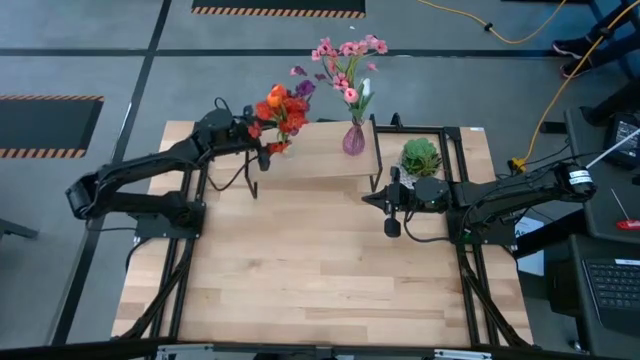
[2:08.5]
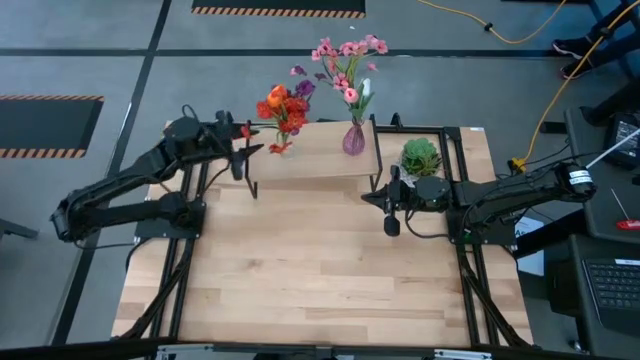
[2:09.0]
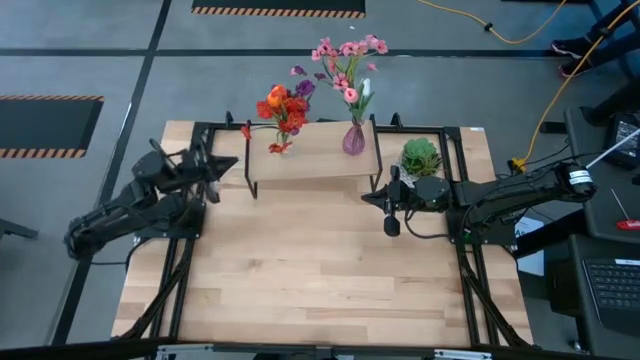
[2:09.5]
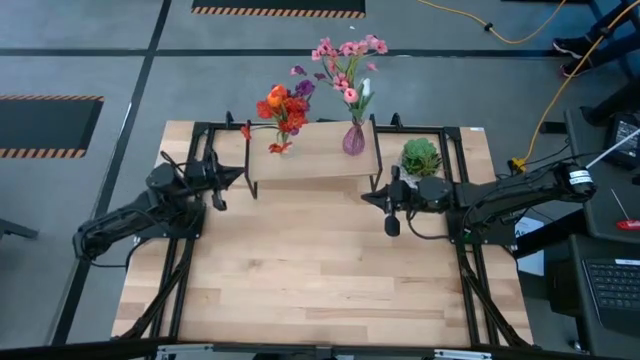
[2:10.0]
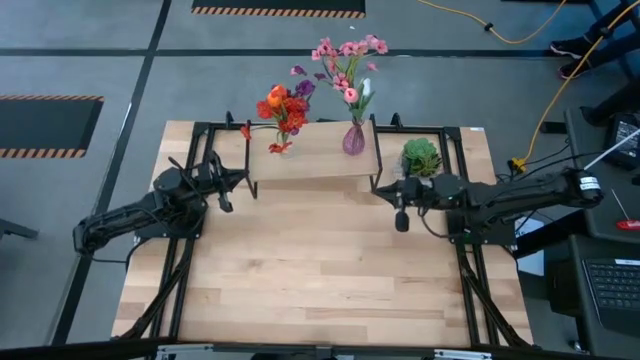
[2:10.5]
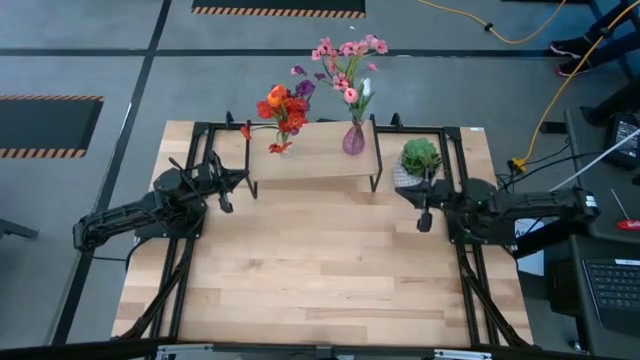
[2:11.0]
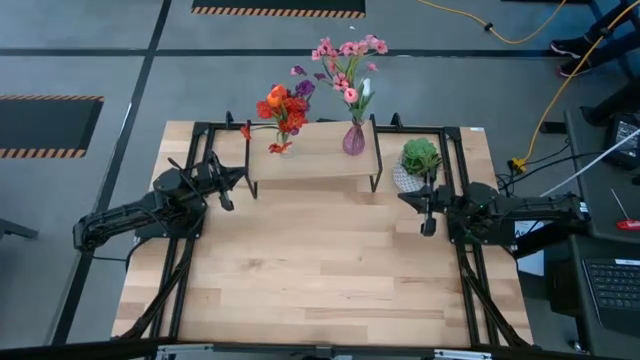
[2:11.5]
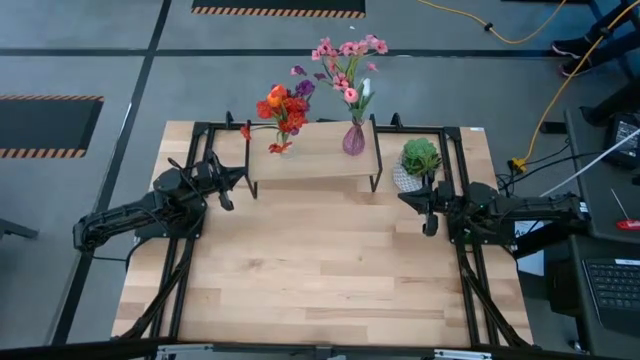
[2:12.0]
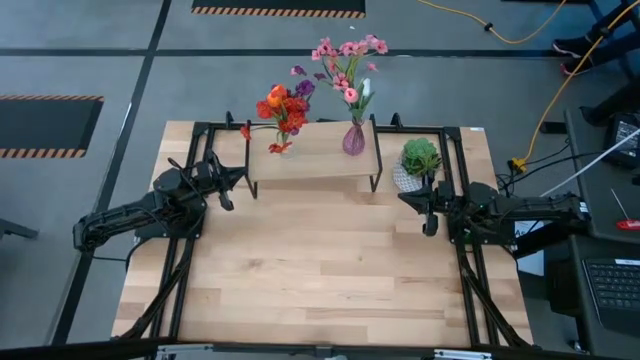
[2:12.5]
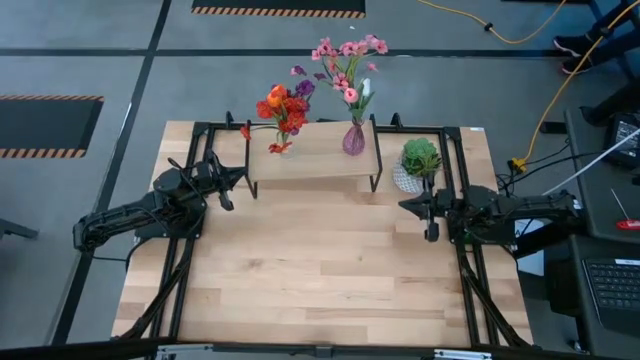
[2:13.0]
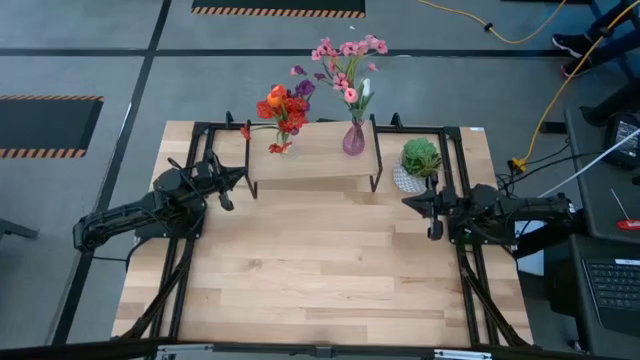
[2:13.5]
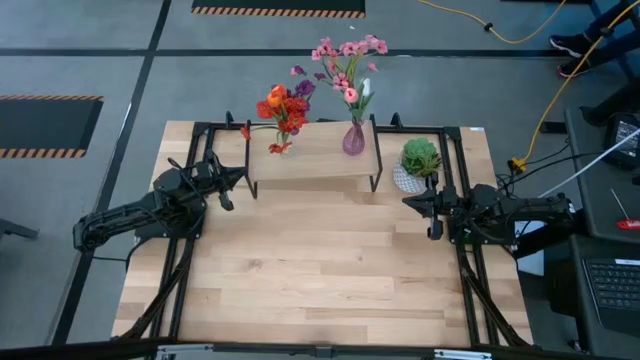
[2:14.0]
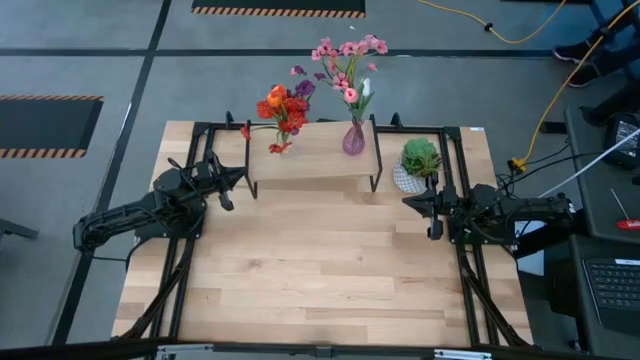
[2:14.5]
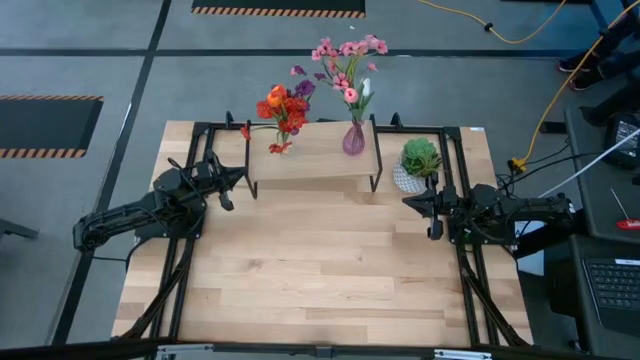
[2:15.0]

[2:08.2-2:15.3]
Task: Pick and place flowers into a vace then onto a shelf
Return to Home Position

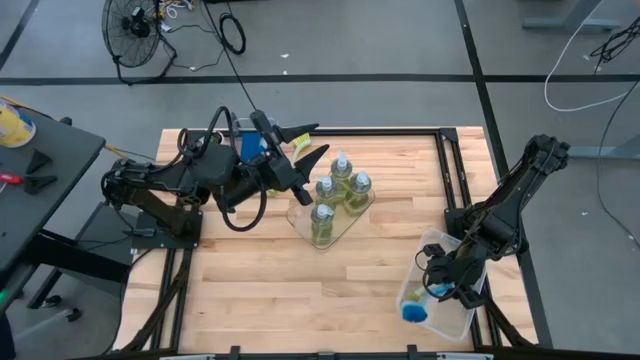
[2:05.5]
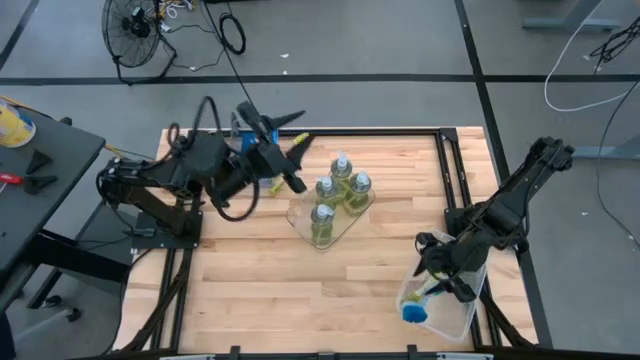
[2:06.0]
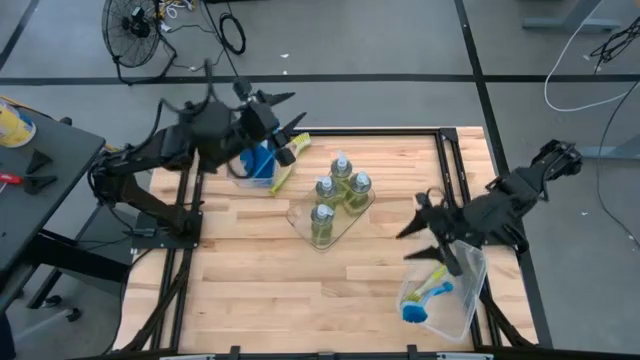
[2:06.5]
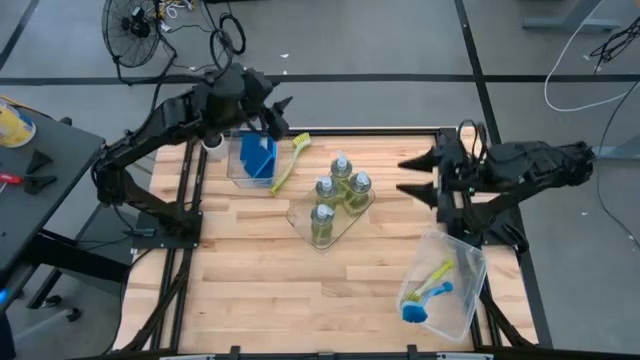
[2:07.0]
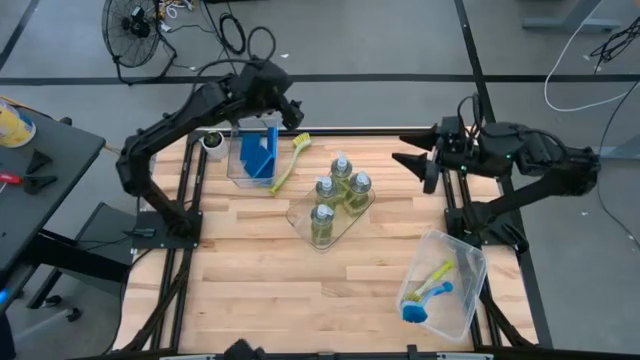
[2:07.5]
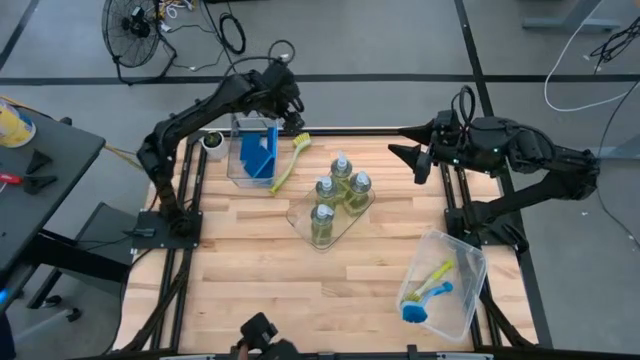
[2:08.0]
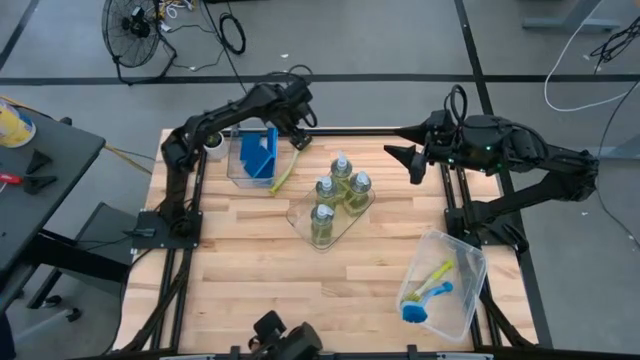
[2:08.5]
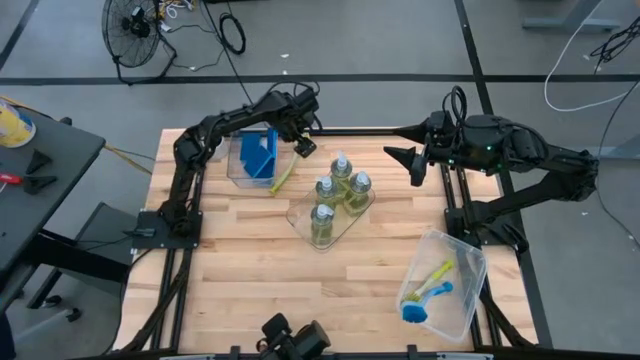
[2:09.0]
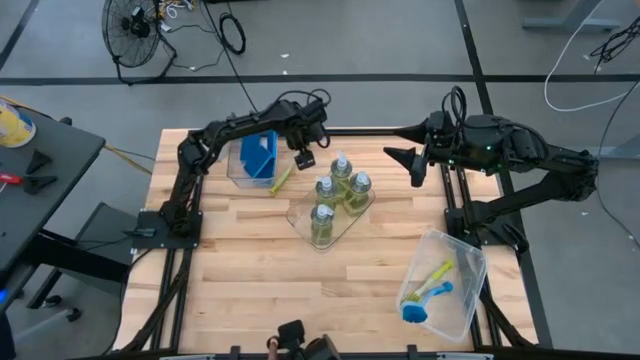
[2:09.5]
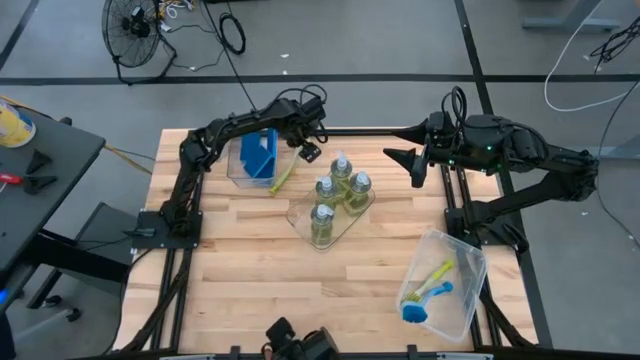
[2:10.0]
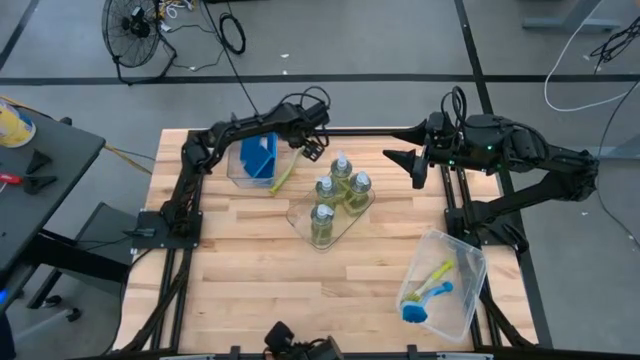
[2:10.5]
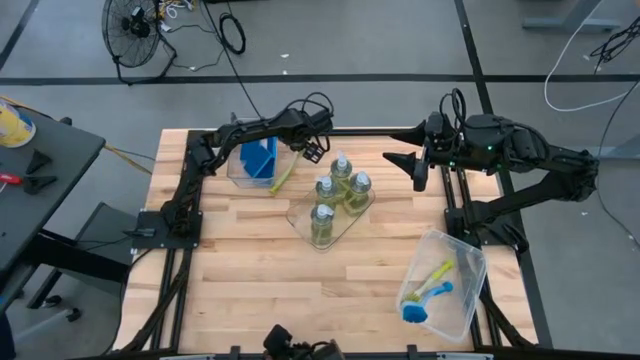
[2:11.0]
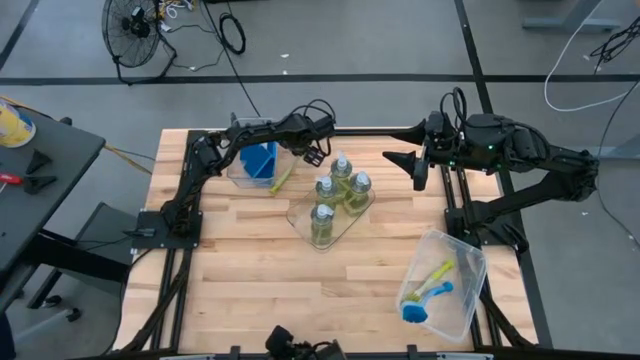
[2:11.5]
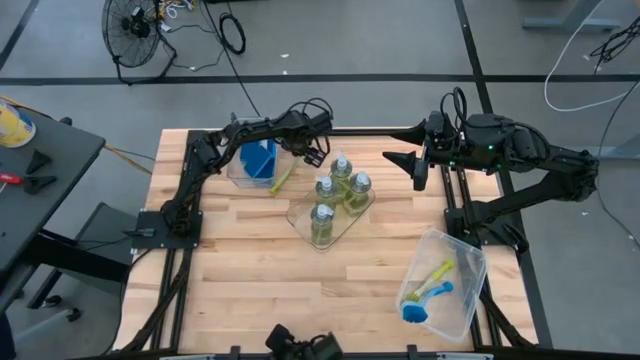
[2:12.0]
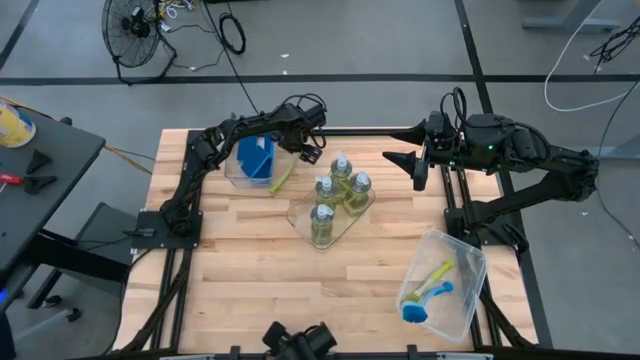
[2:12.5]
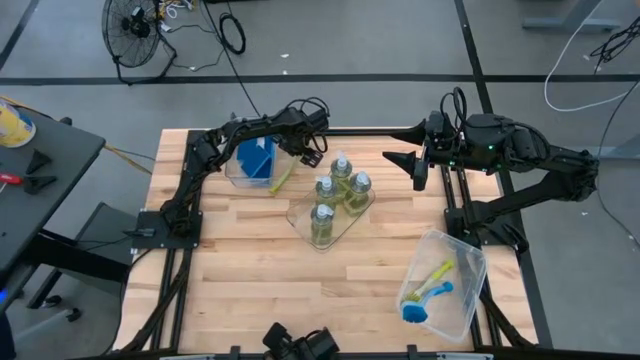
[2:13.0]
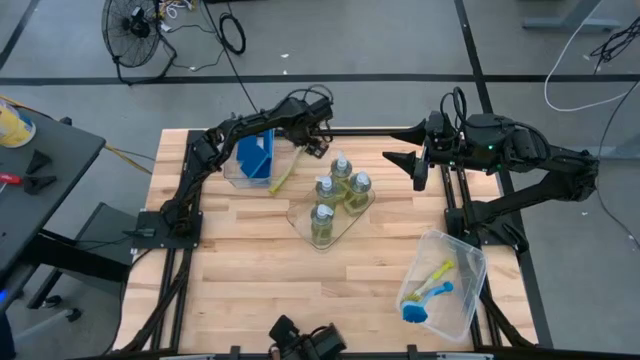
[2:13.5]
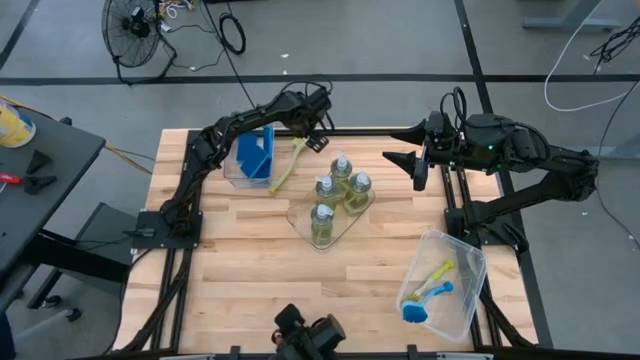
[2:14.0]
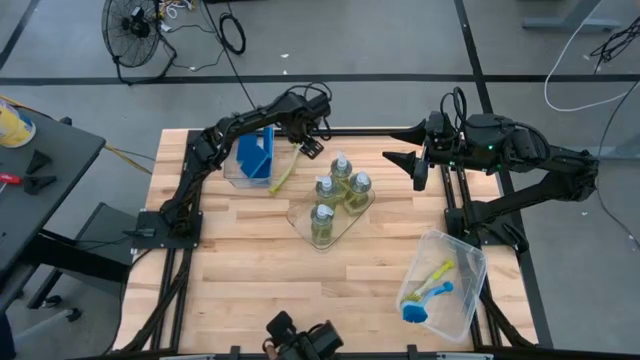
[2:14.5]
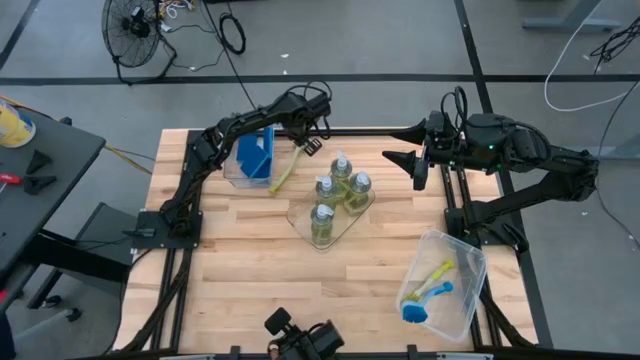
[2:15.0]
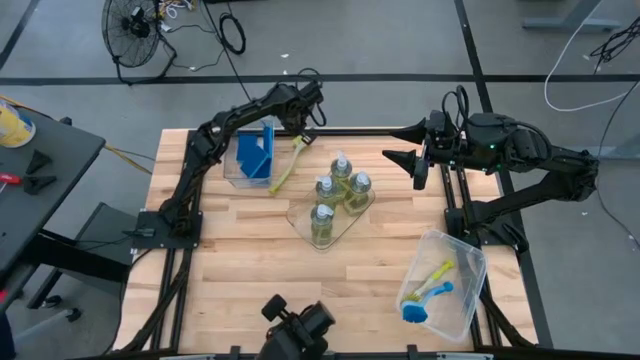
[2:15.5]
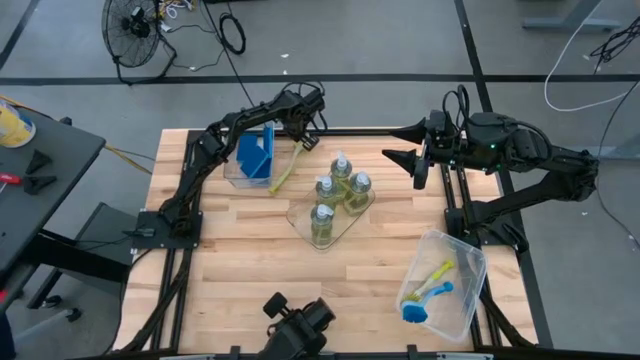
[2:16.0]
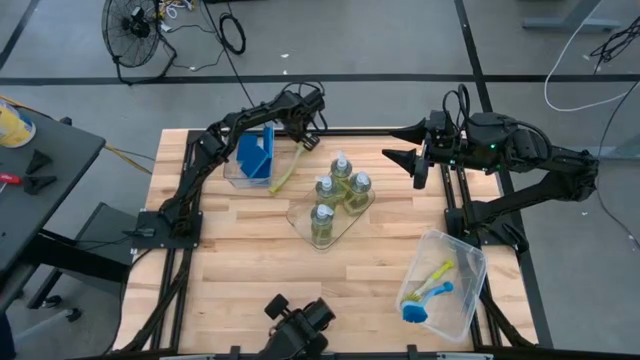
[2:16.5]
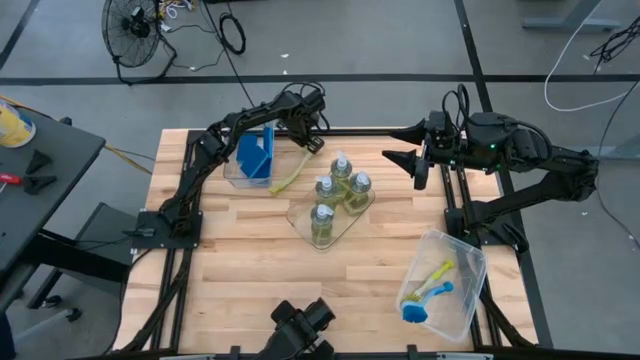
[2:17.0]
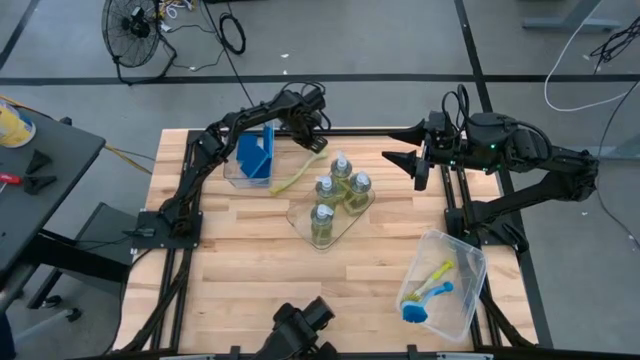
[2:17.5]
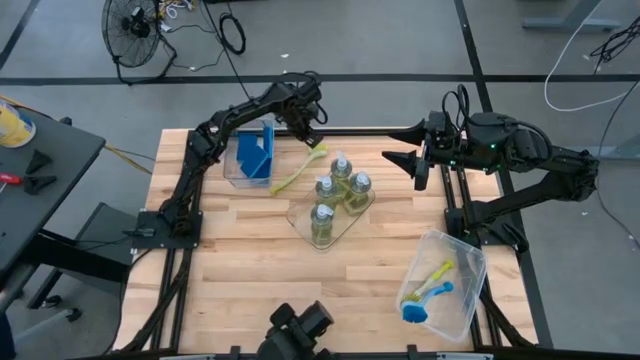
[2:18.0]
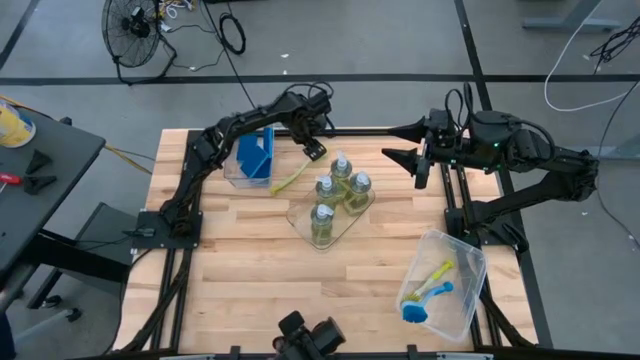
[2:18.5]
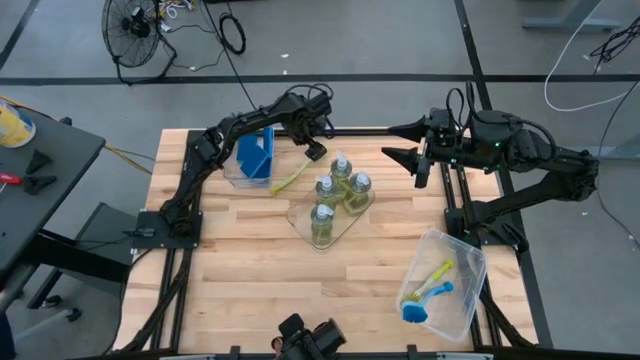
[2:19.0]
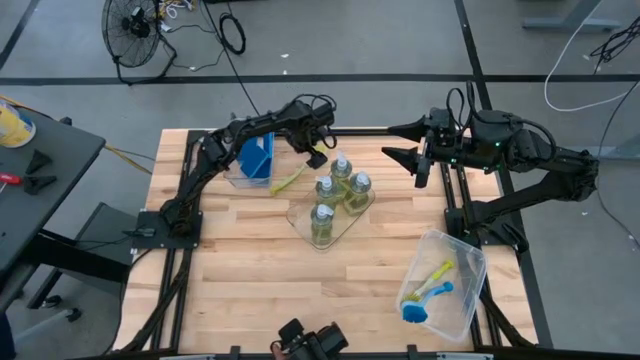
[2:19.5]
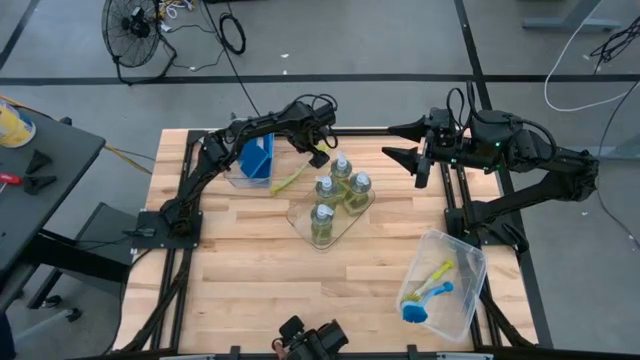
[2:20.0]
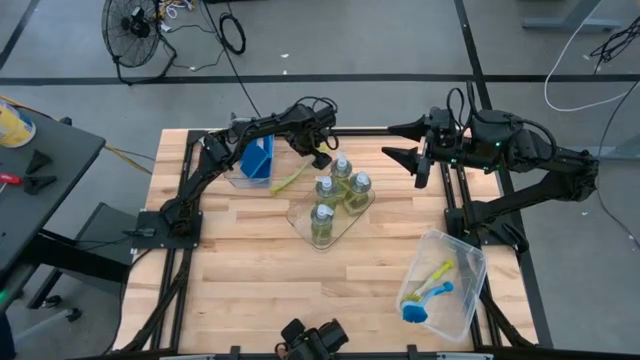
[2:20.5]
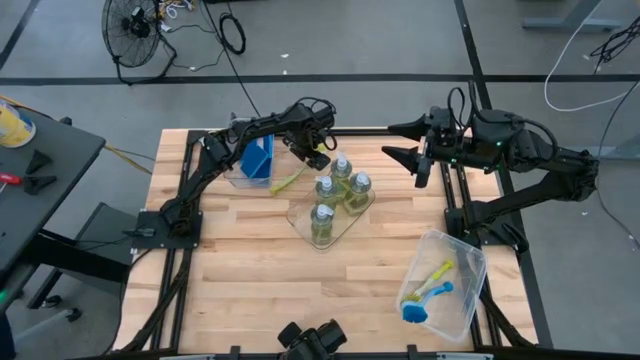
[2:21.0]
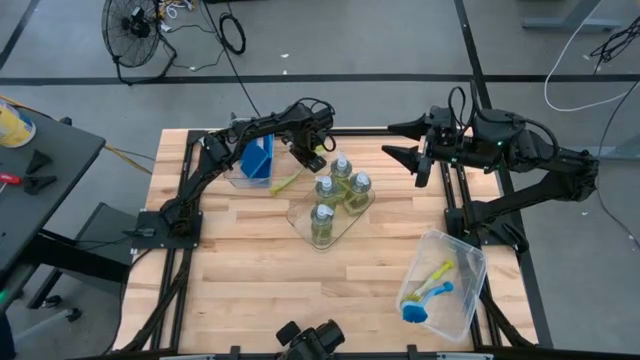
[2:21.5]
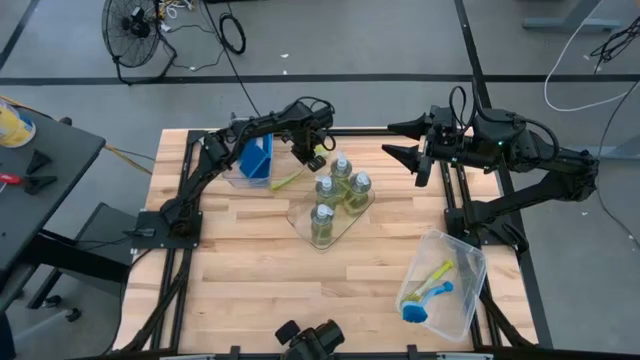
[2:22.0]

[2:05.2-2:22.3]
Task: Pick & Place Kitchen Sink Supplies
Put the yellow toilet brush into the transparent container
